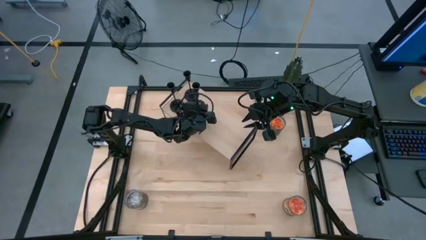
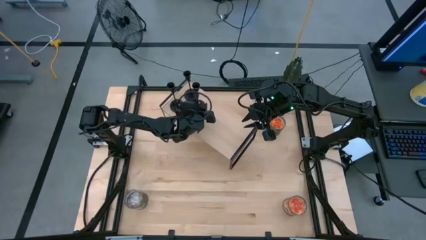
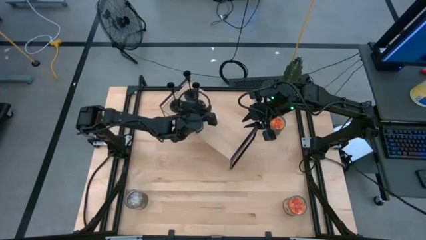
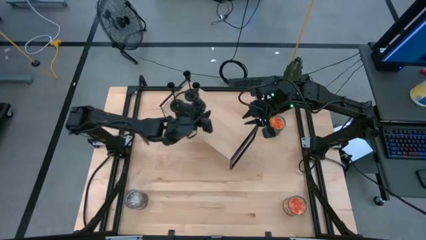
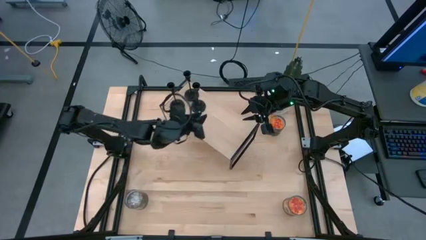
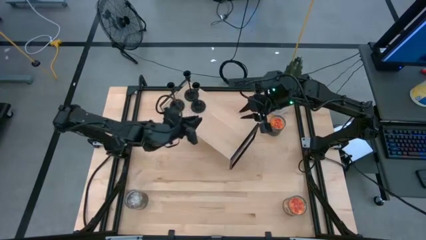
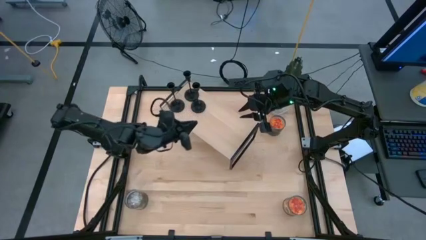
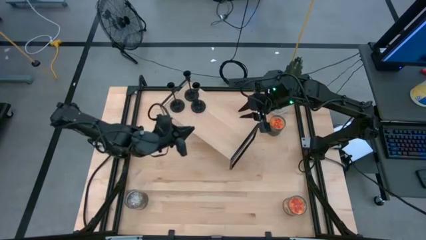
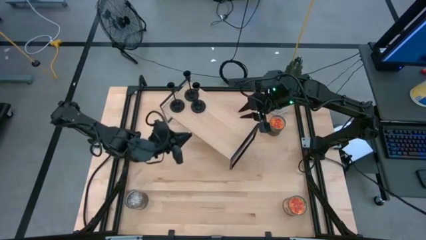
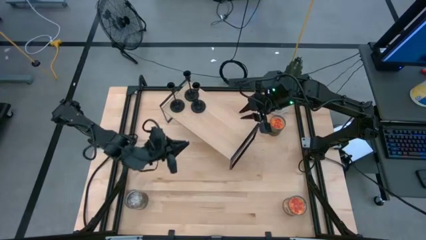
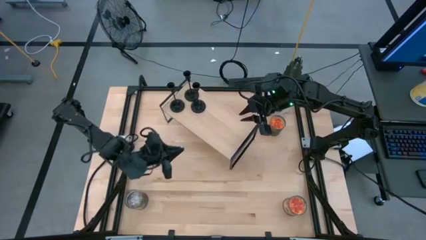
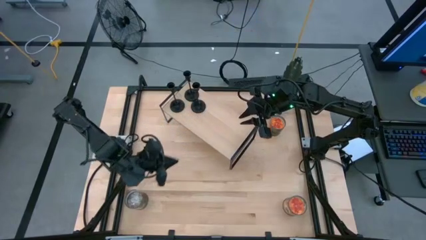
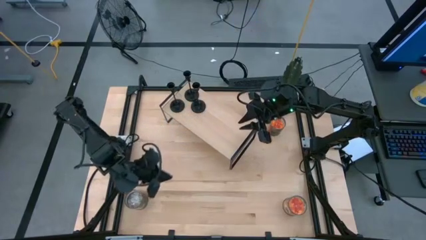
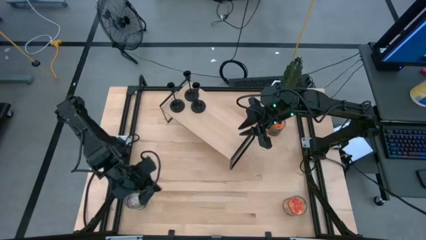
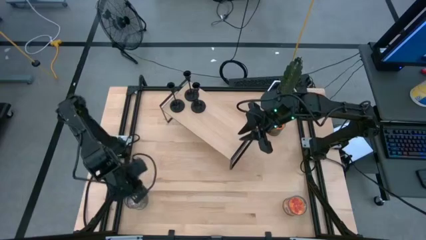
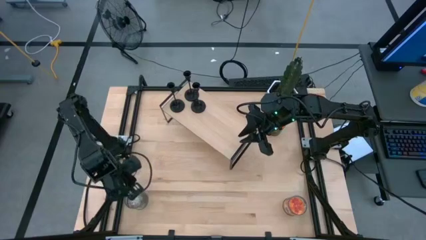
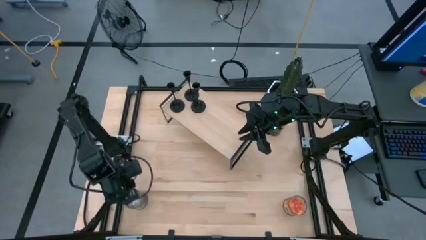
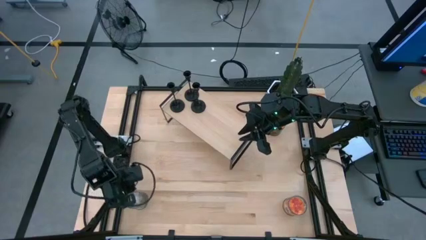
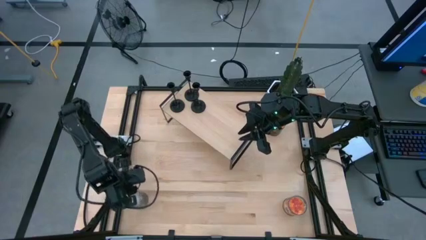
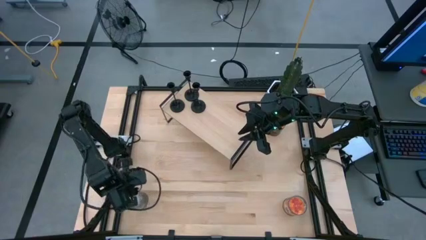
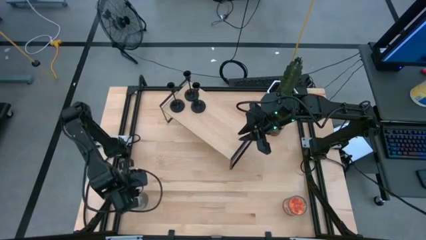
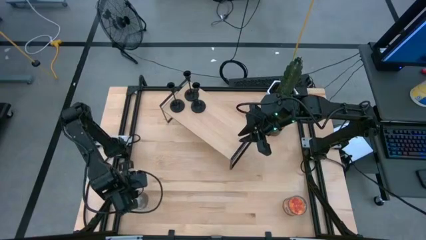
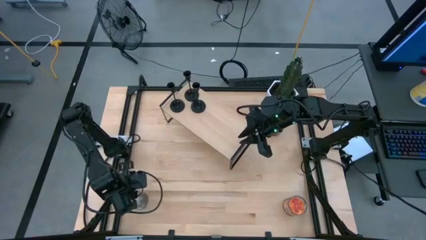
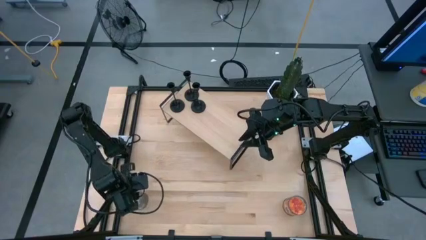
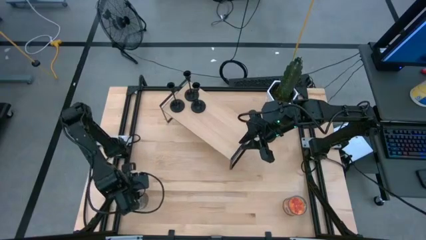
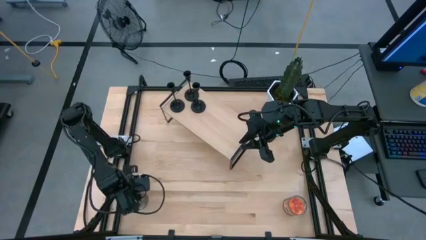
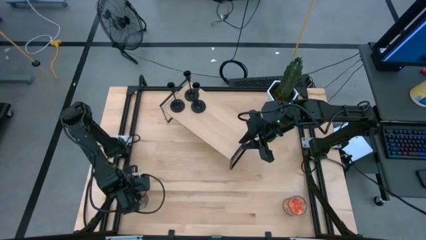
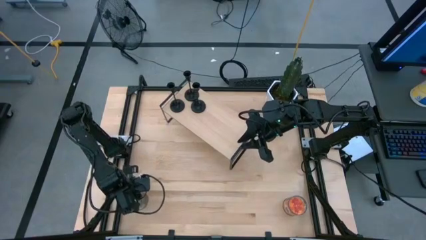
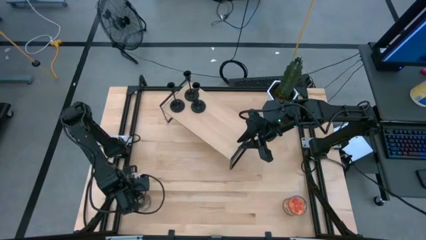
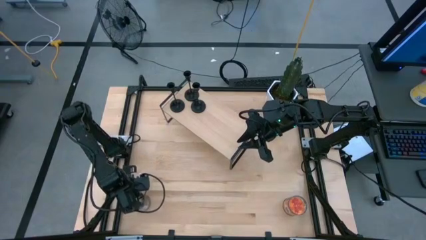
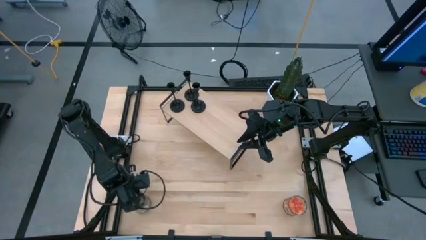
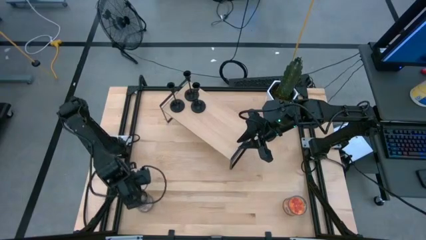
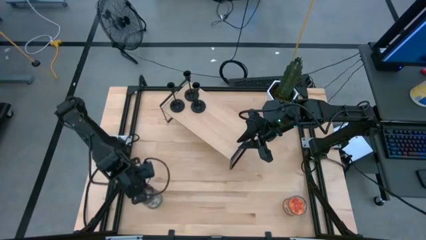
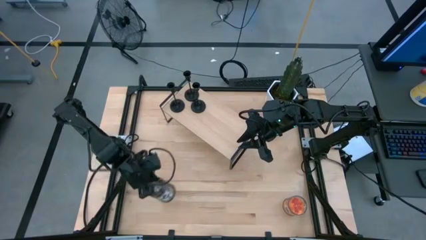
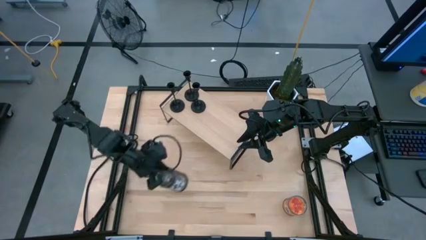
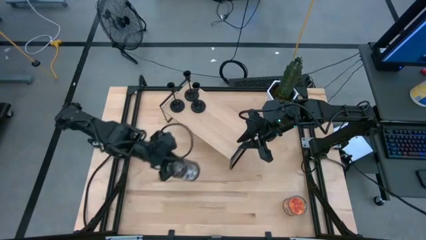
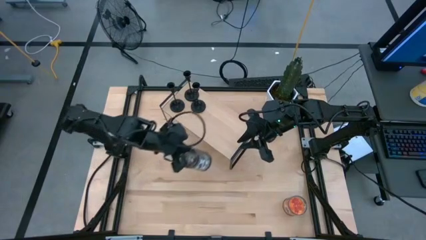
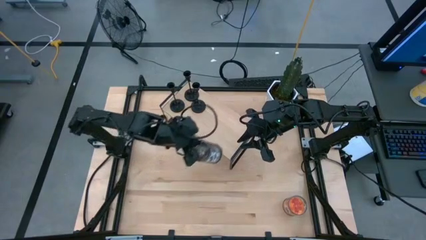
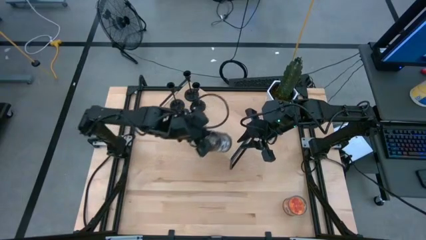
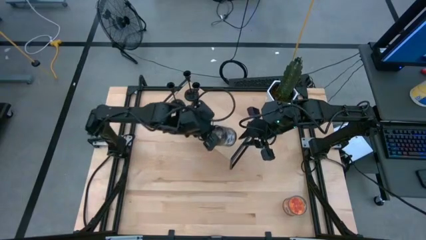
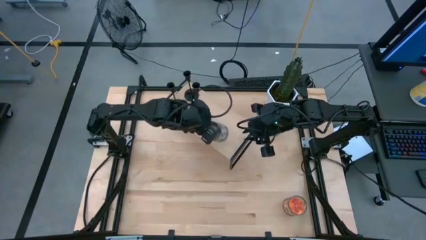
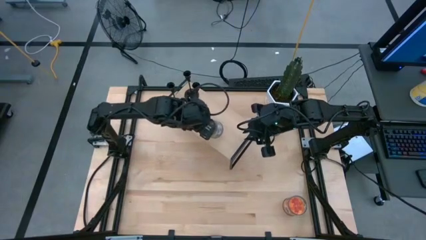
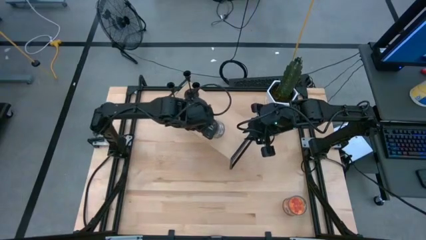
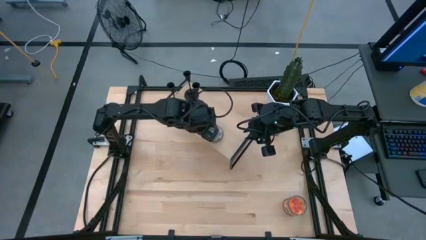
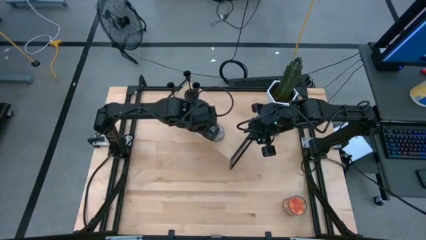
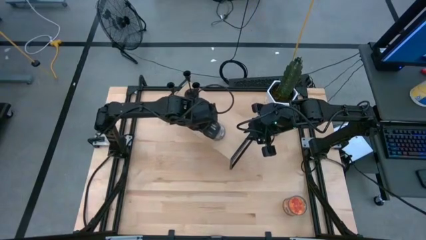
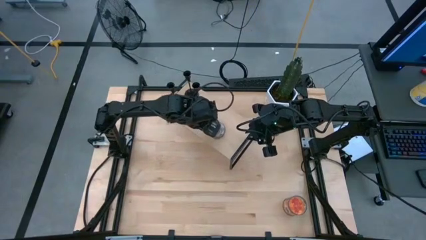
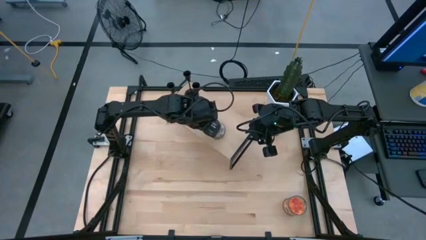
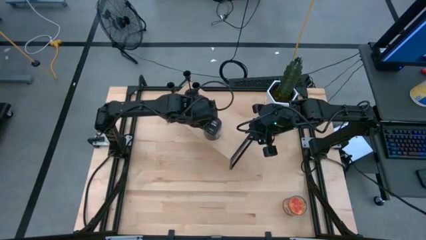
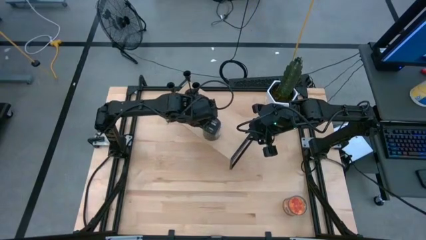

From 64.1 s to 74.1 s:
Task: Pick & Place candle stick holders
Put the brown scented candle on the shelf

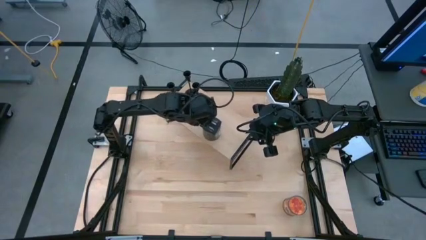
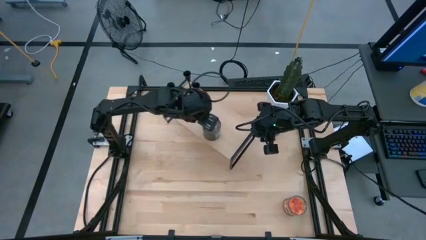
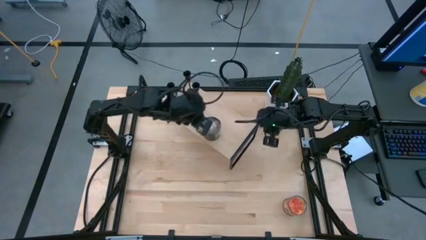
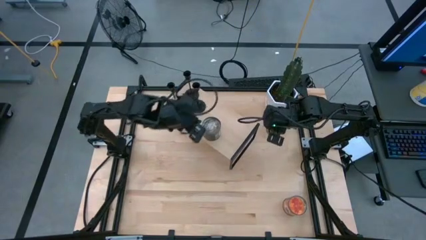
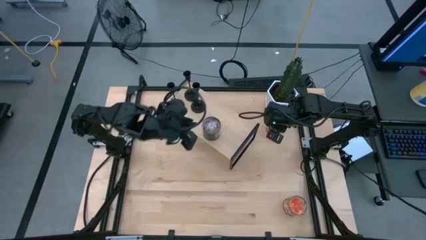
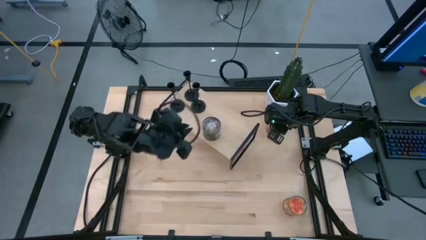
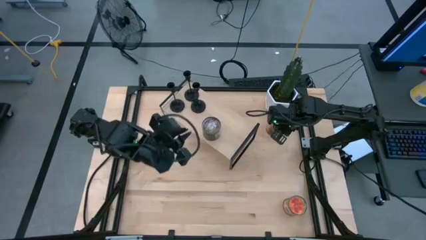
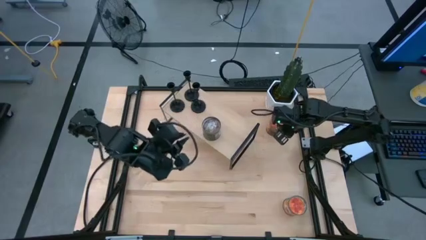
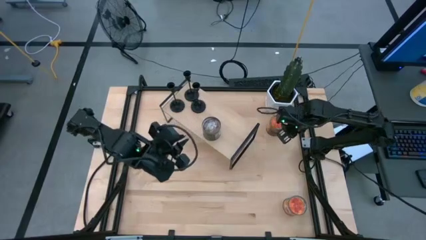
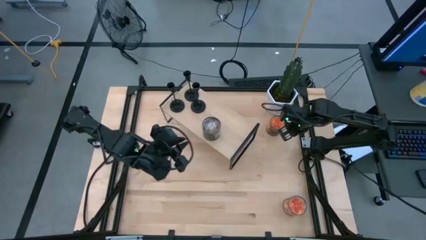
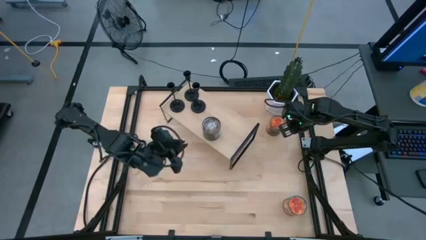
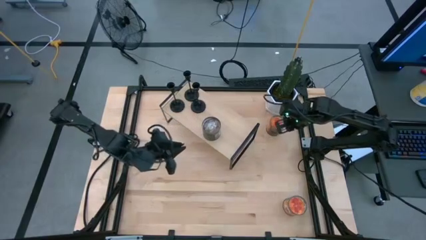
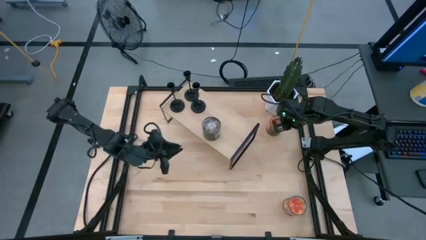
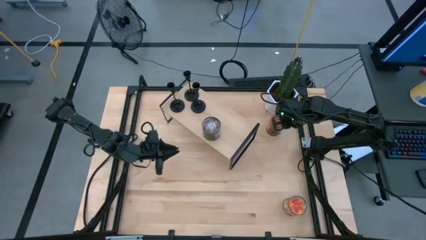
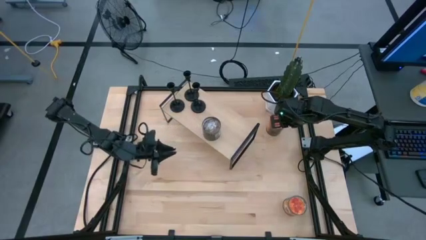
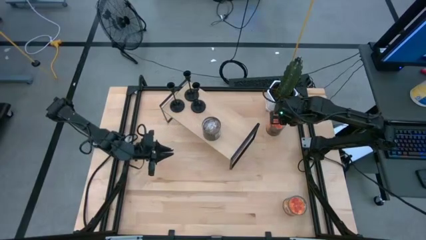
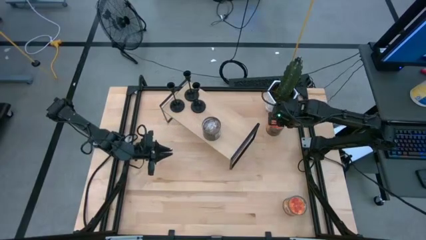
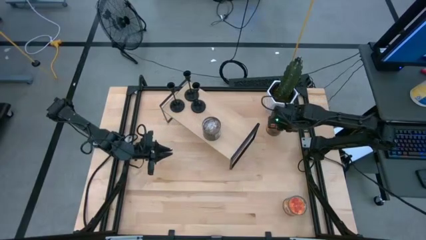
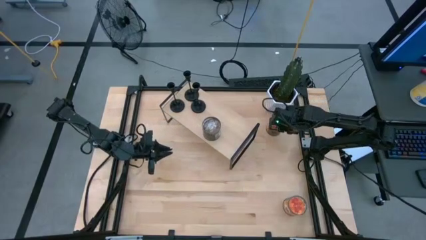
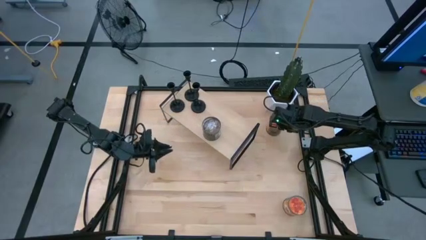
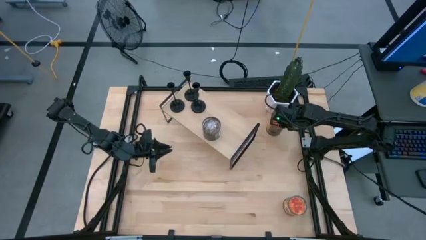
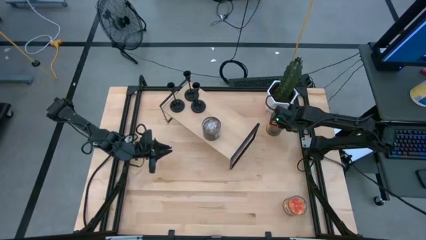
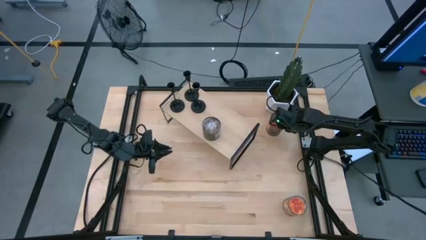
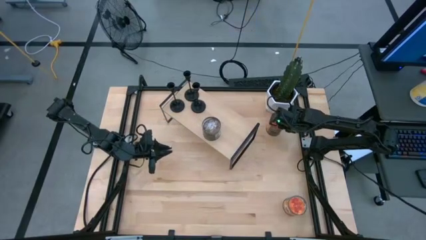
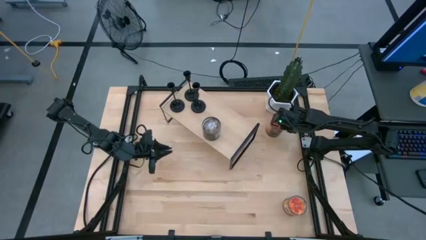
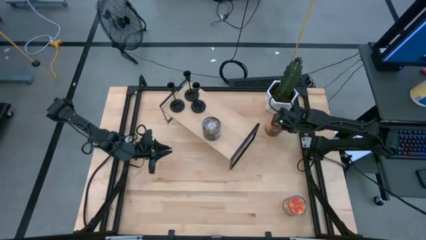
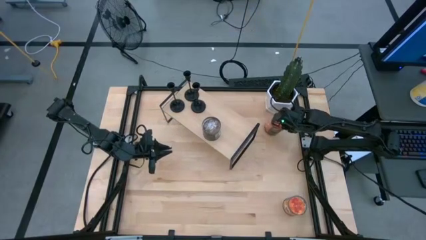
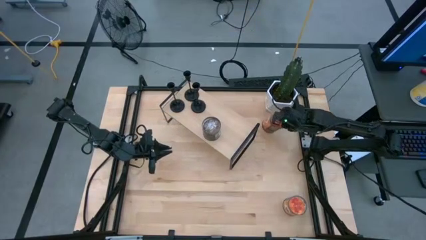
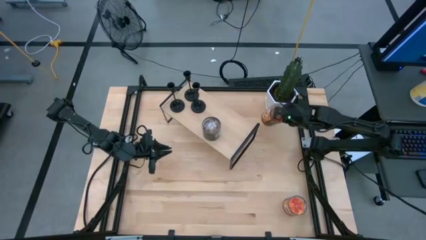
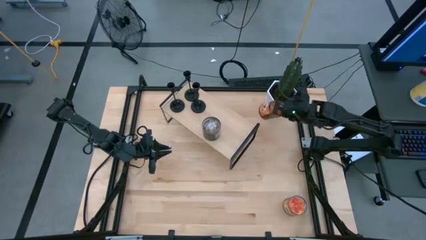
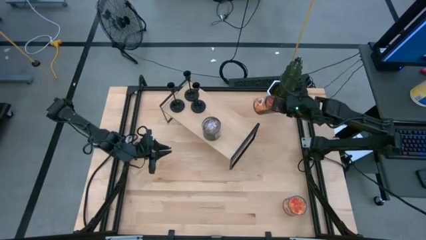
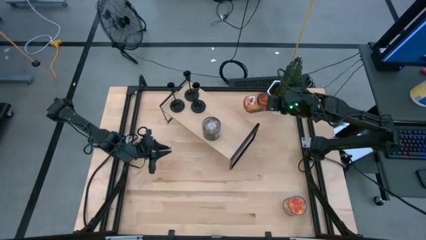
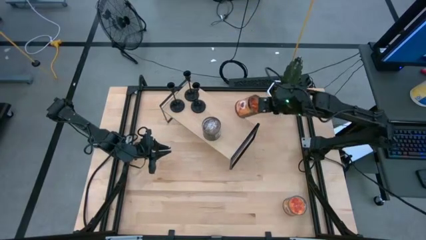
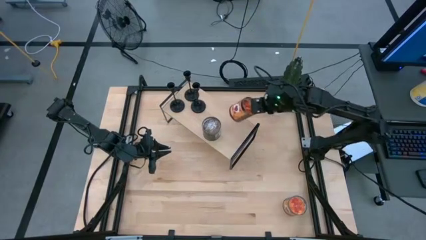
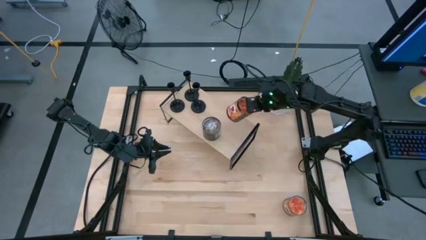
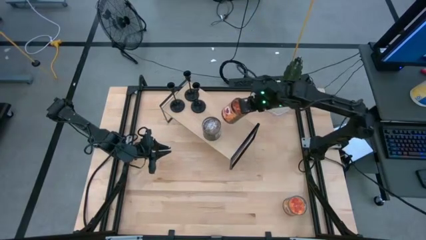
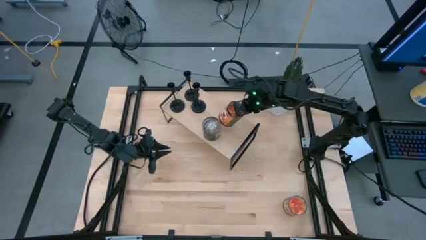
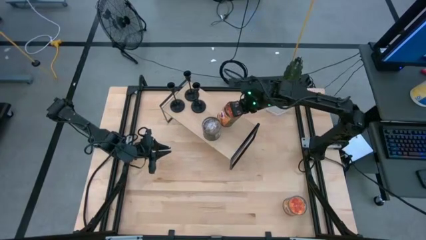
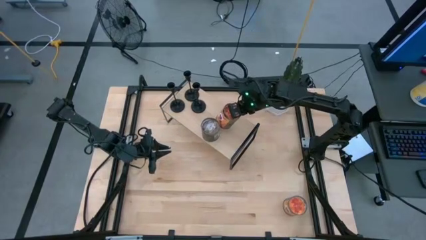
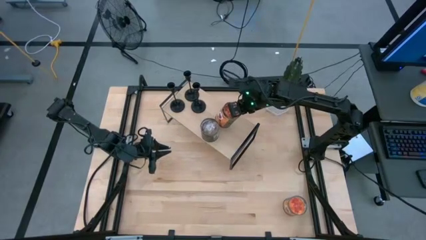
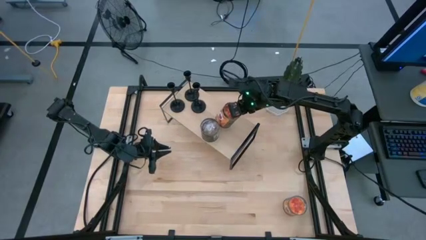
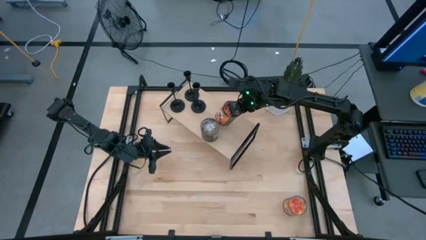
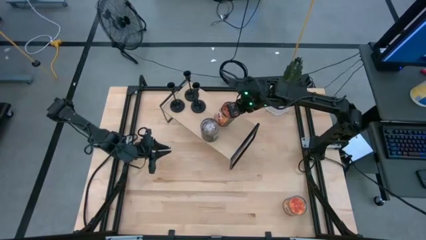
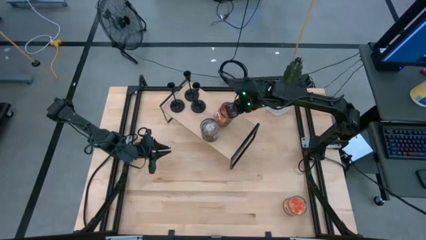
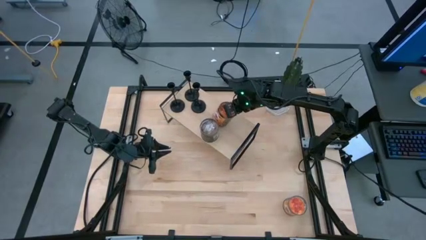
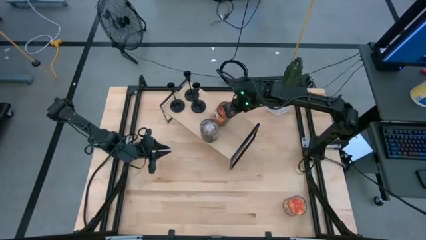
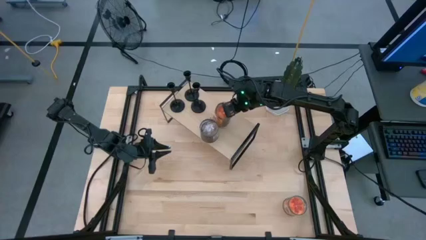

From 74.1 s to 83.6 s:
Put the top orange scented candle on the shelf
